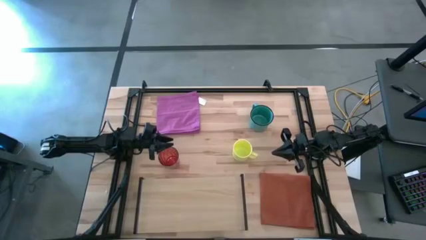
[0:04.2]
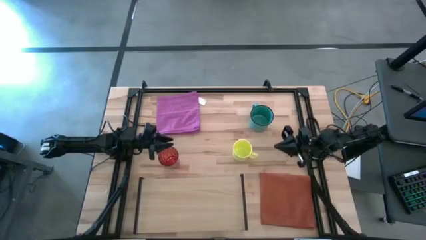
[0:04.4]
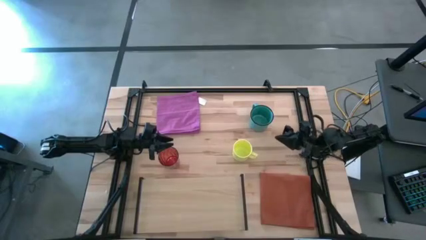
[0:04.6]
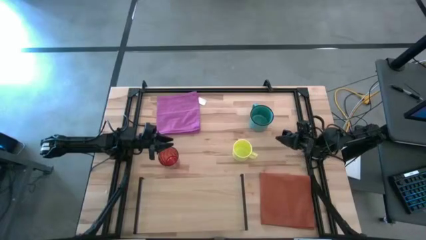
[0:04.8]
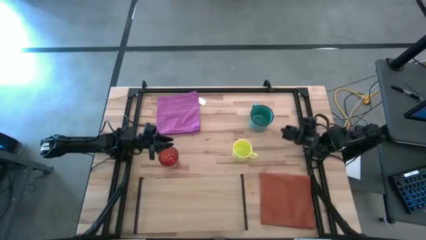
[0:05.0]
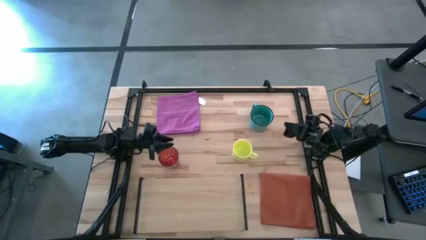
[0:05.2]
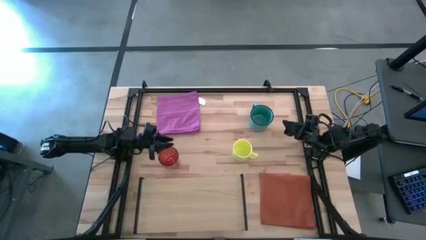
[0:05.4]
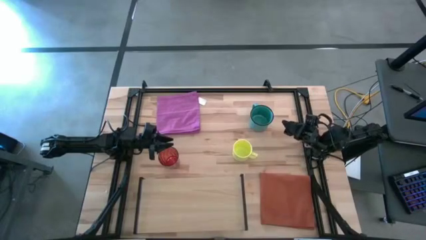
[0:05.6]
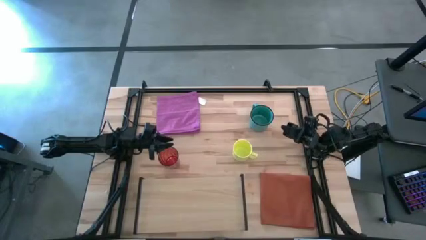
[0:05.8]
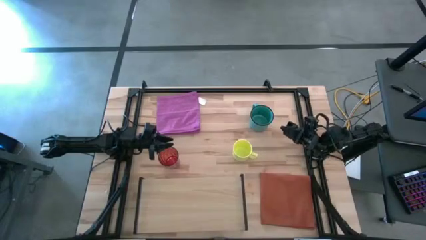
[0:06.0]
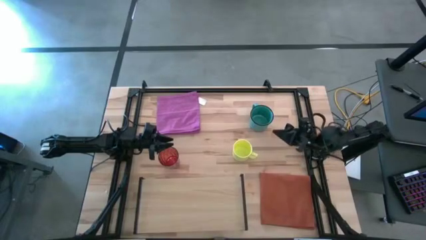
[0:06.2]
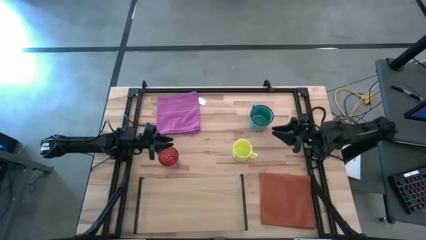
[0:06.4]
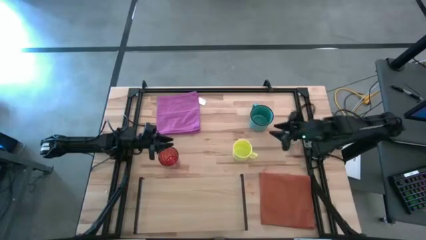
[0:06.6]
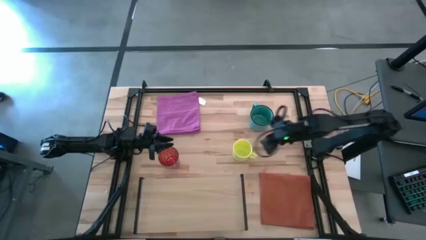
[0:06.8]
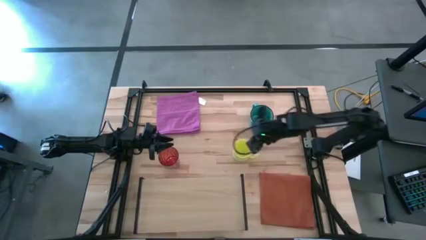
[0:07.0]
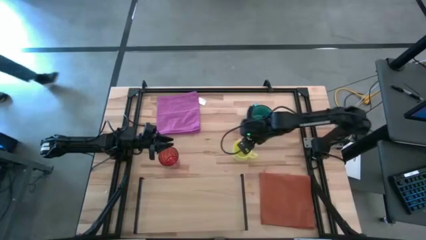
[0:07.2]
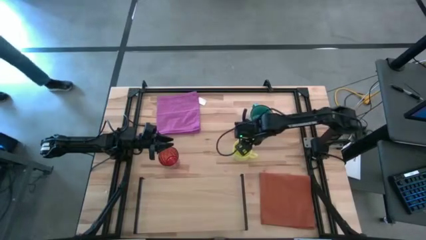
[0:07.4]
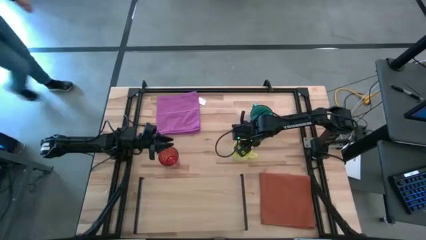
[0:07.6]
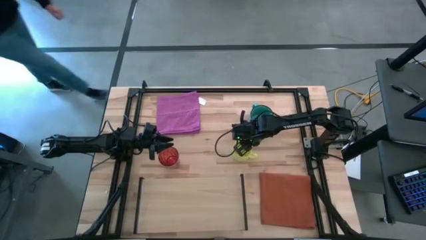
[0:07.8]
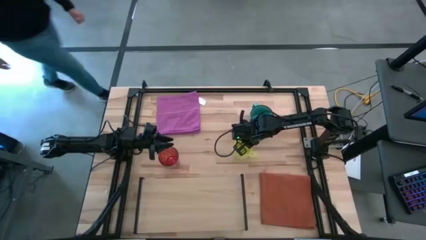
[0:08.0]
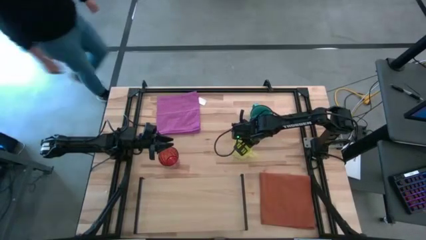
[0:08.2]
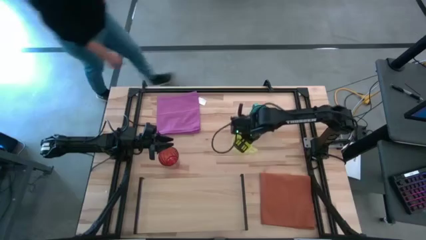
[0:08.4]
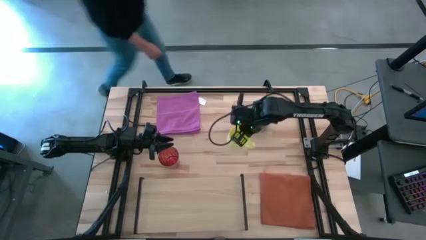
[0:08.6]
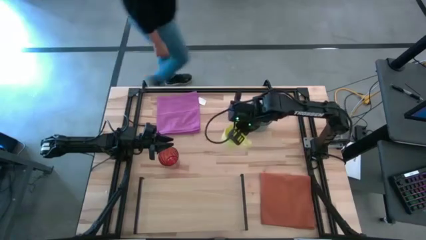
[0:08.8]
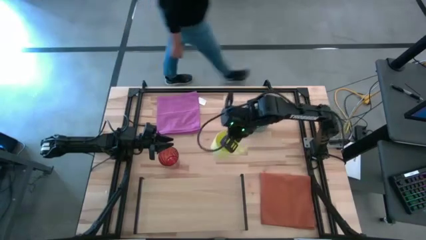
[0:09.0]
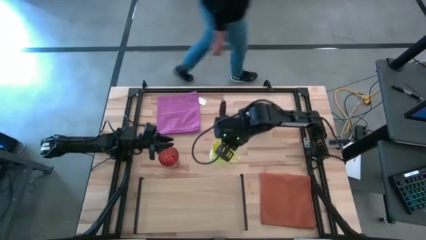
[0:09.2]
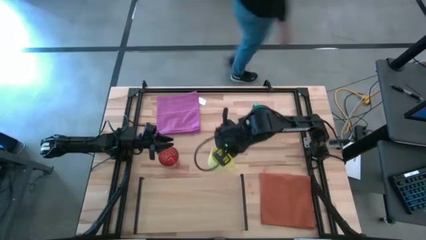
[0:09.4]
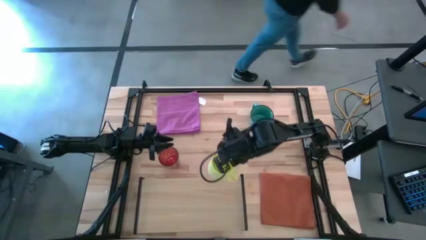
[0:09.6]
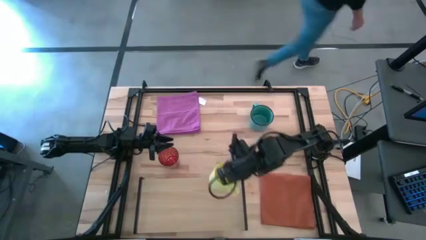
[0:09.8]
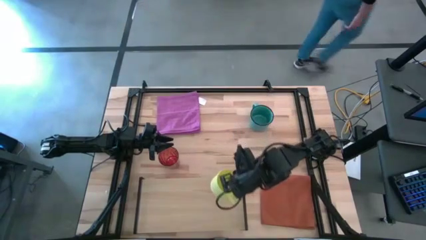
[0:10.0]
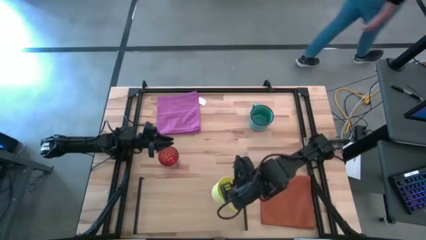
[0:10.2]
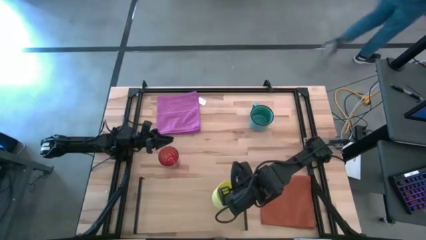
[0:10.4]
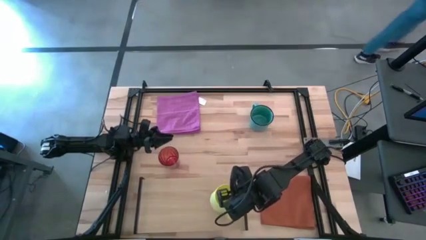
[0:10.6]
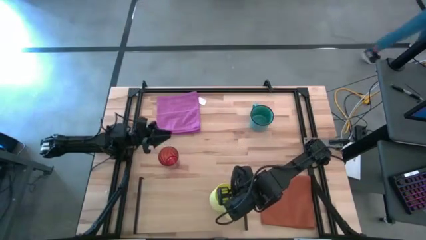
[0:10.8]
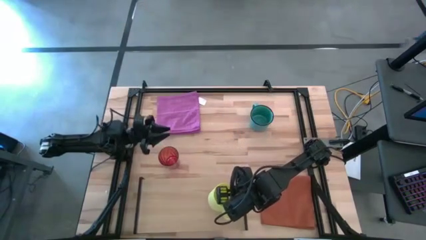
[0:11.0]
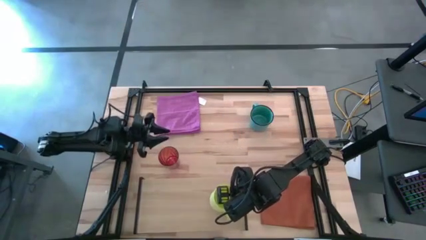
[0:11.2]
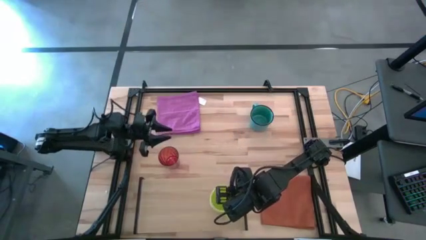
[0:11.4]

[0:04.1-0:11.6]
Task: Stack small to large cups/mugs on shelf
Put the yellow mug on the shelf

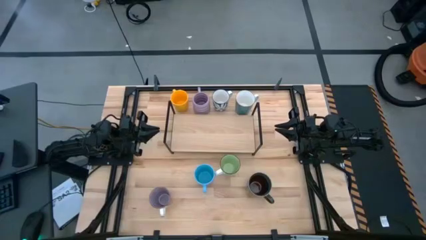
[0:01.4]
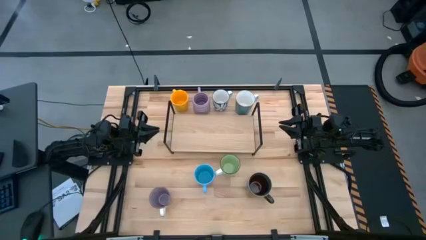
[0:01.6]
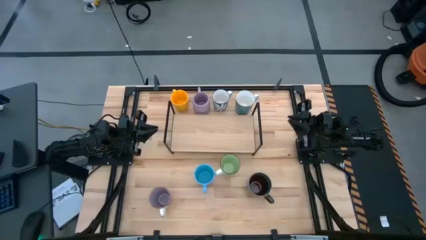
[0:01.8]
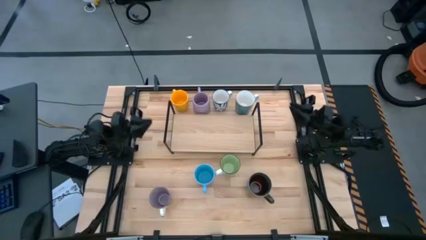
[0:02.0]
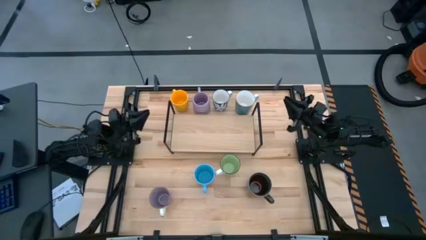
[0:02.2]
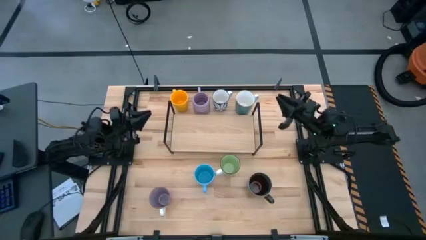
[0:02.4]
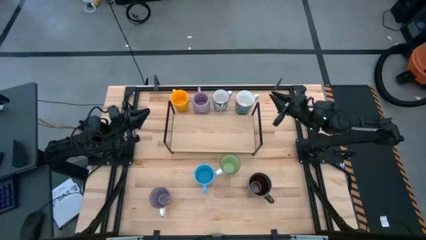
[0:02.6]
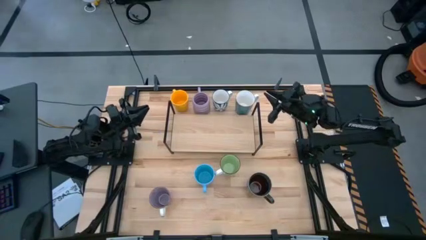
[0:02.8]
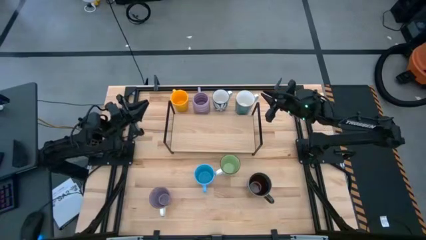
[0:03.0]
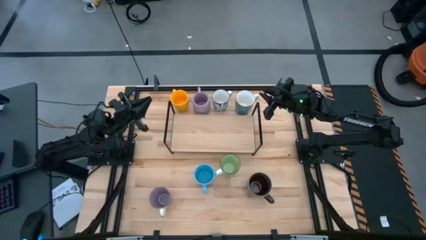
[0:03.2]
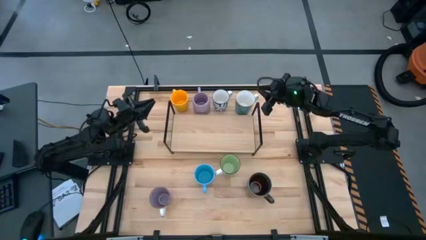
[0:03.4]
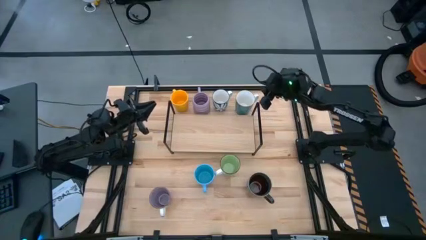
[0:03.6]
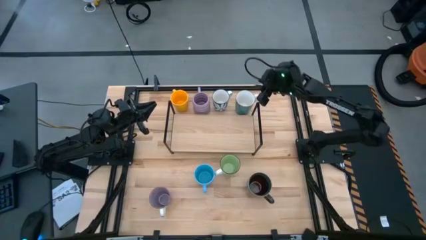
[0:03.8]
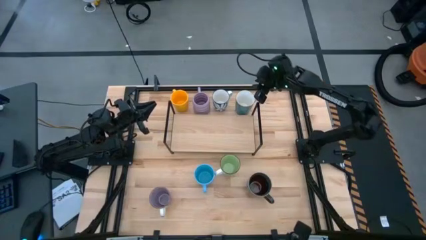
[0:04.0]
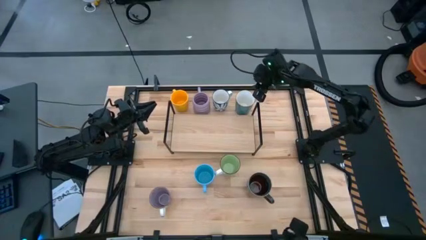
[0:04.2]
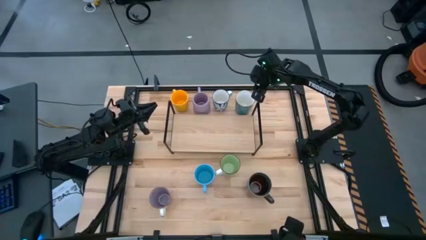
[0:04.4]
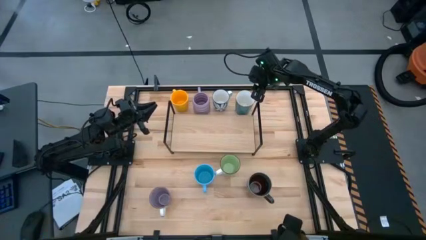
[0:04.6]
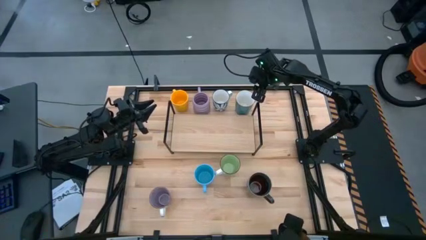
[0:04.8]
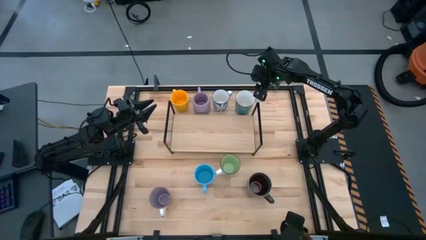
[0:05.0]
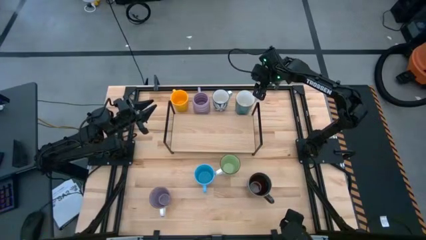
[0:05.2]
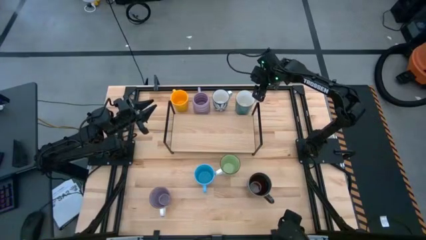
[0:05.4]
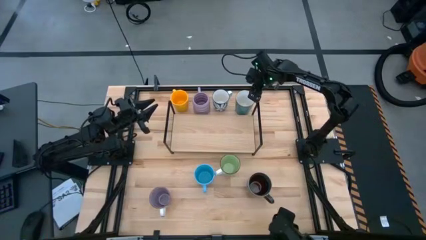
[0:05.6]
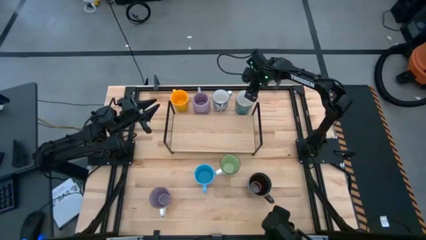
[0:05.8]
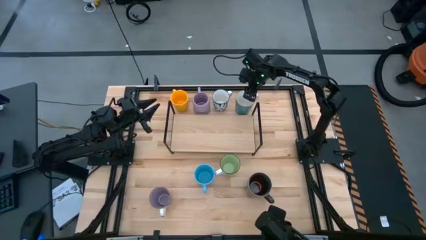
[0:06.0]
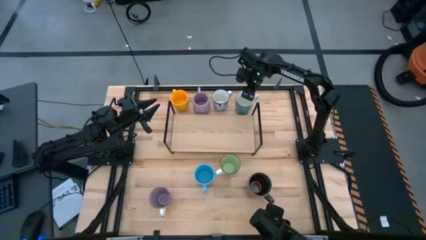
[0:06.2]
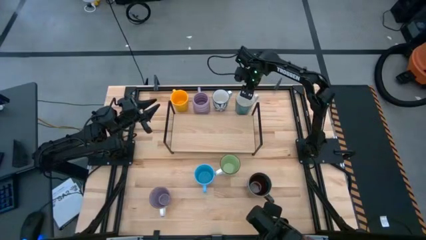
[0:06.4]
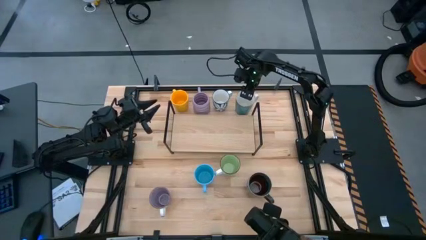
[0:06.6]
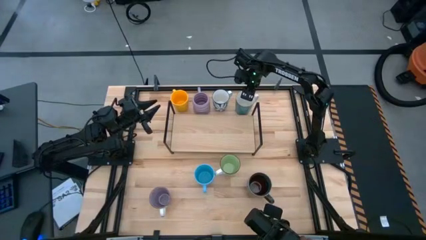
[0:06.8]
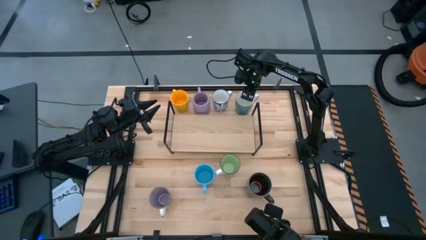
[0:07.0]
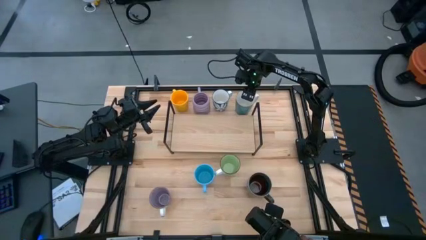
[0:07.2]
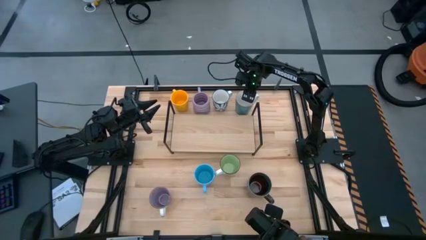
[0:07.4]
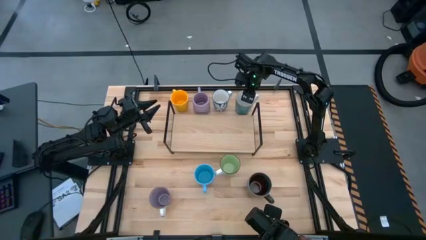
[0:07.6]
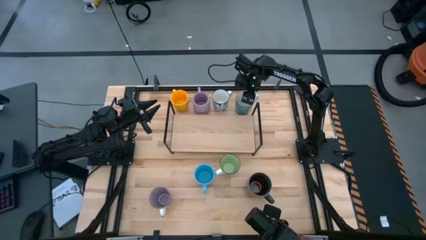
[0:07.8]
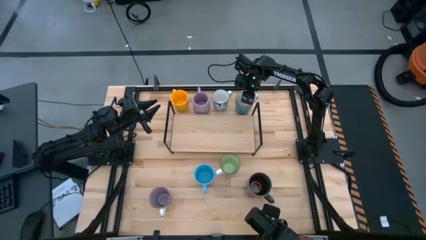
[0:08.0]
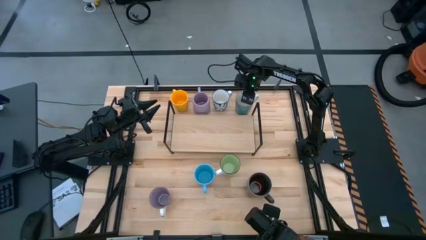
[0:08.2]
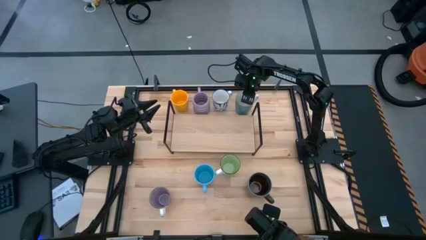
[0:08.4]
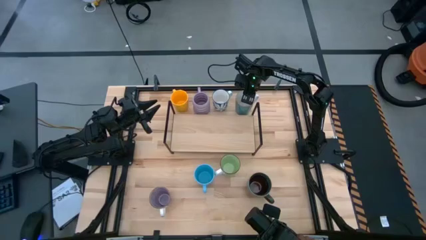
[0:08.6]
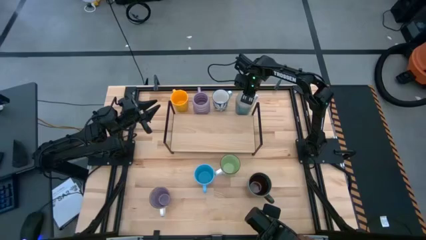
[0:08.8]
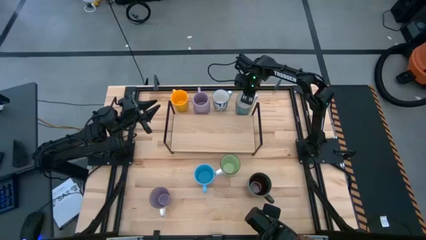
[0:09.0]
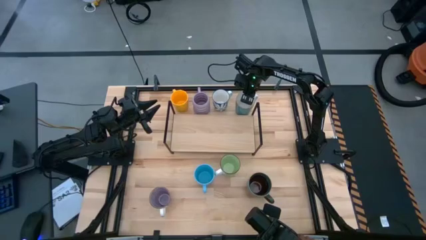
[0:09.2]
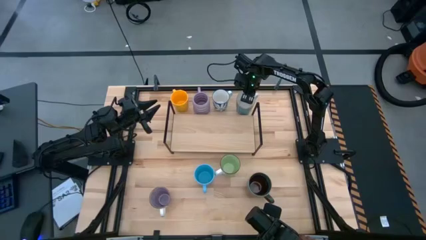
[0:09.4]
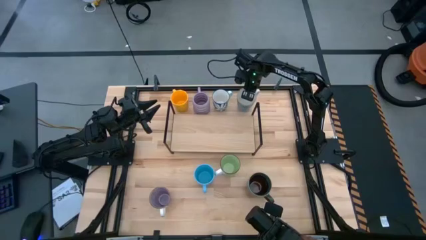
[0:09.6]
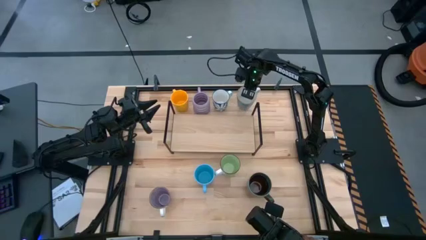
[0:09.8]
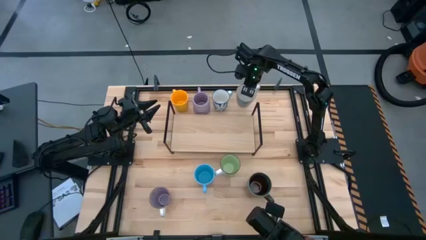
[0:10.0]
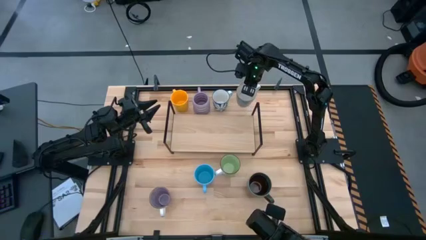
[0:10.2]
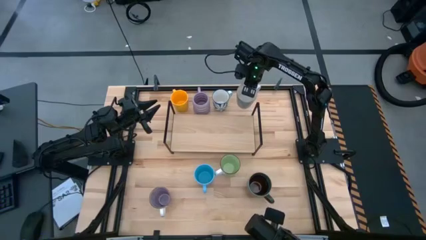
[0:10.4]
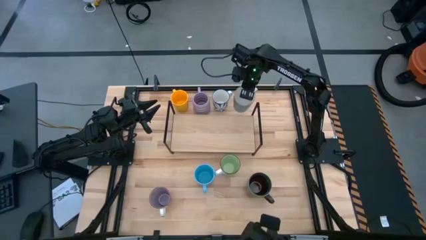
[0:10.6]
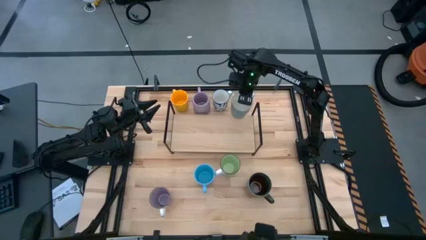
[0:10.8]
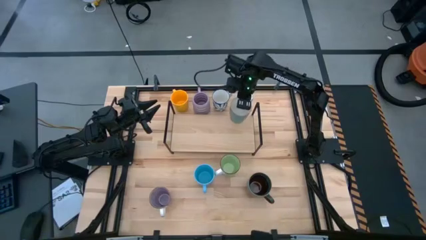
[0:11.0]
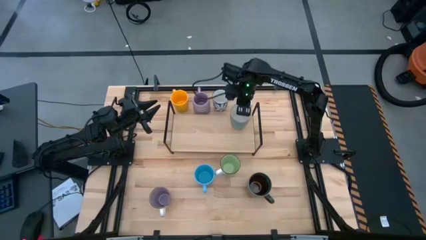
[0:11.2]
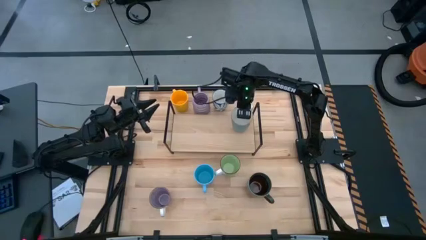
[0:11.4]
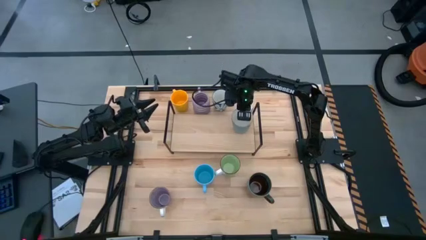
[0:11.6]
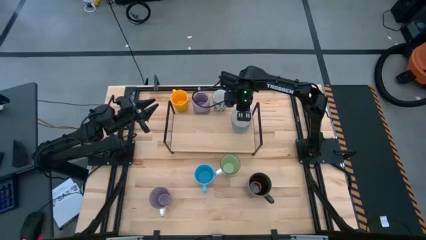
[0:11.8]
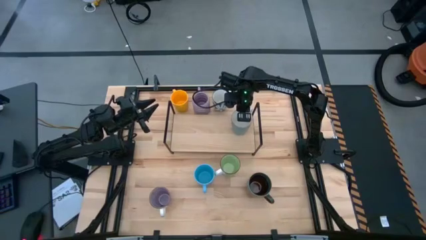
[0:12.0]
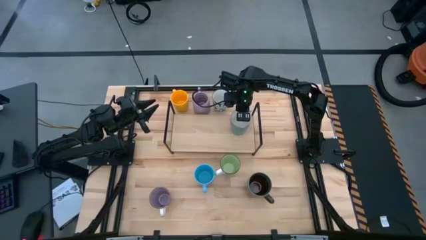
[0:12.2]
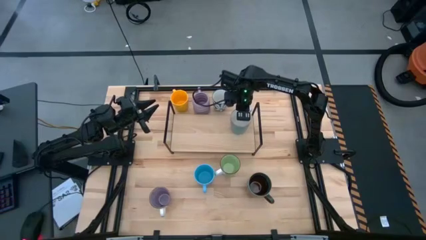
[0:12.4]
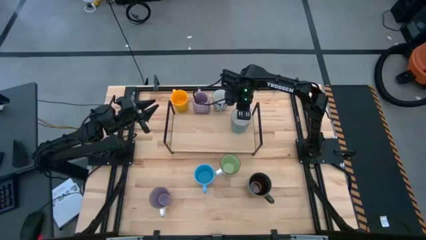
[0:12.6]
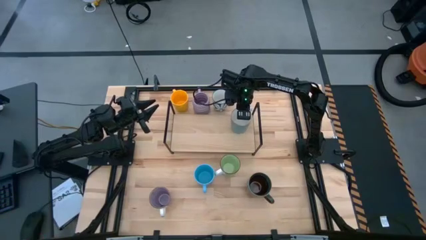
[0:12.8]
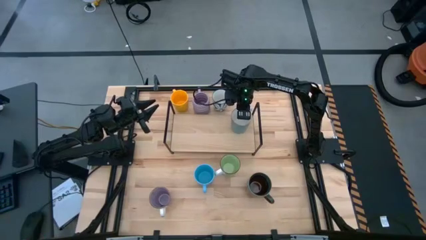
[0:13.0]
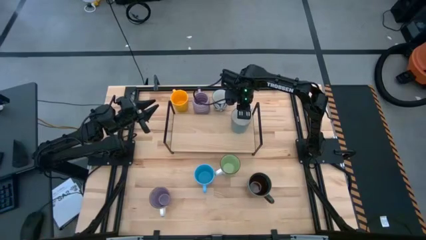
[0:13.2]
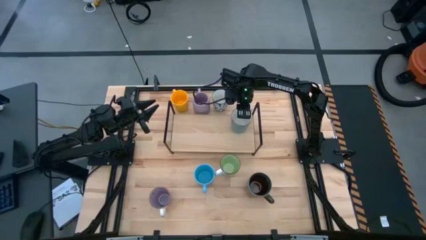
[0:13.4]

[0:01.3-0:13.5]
Task: Place coffee mugs
Put the blue mug on the shelf
